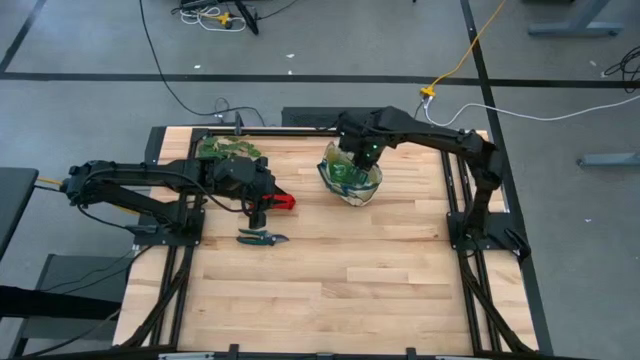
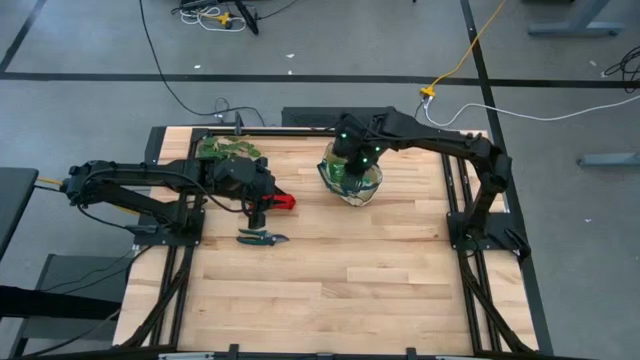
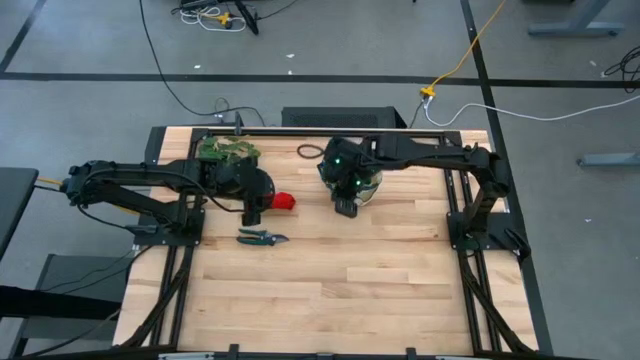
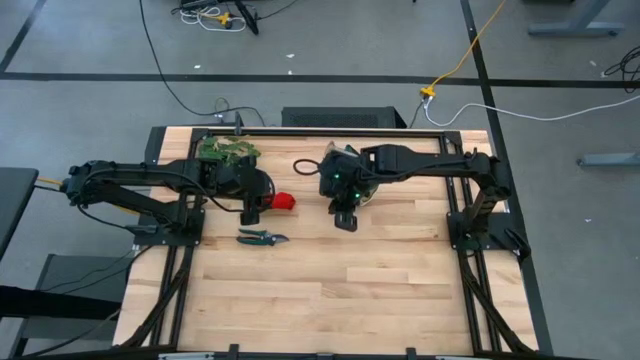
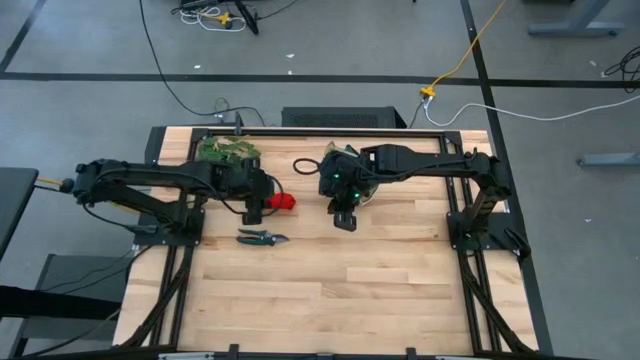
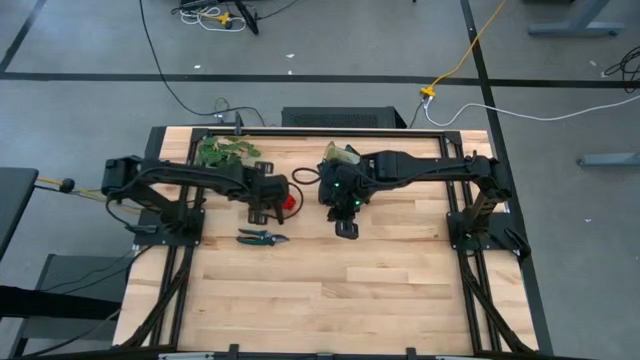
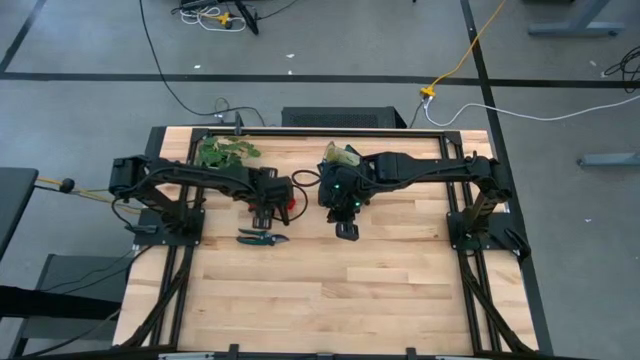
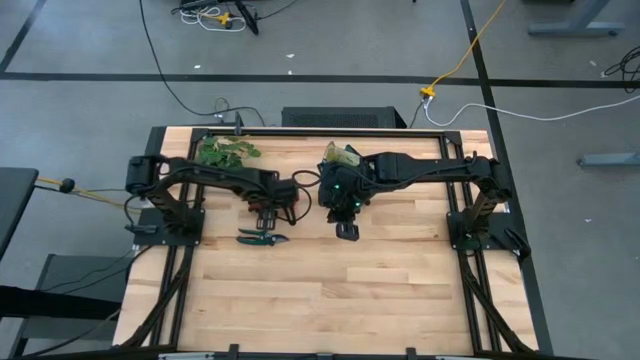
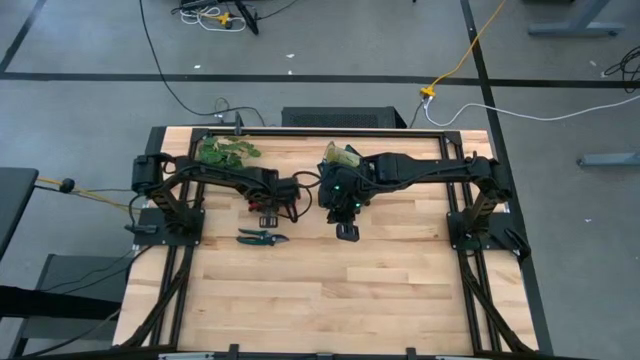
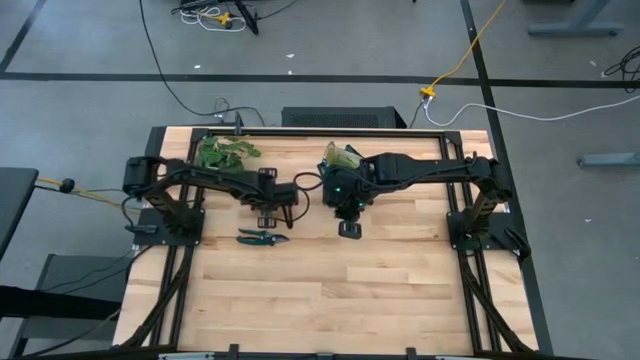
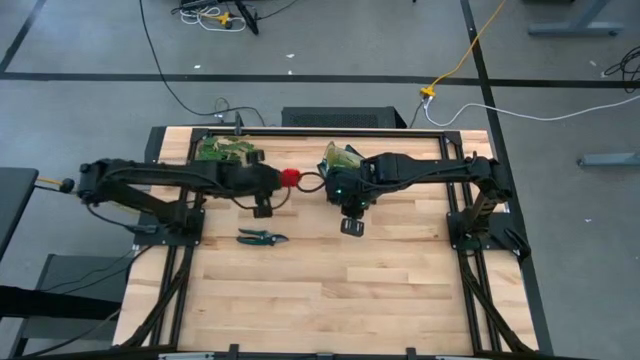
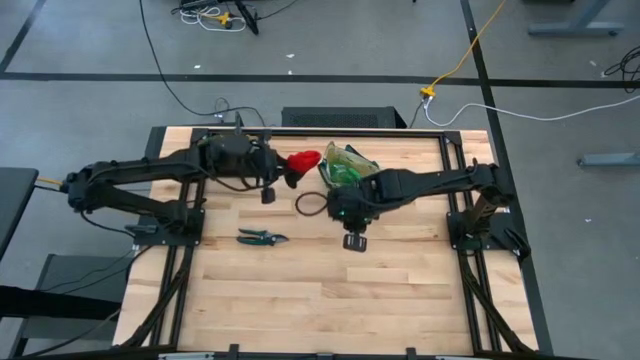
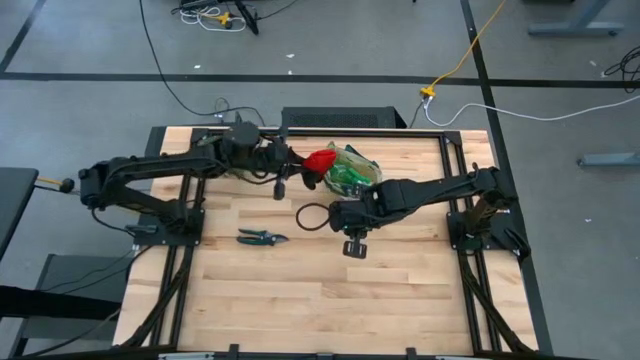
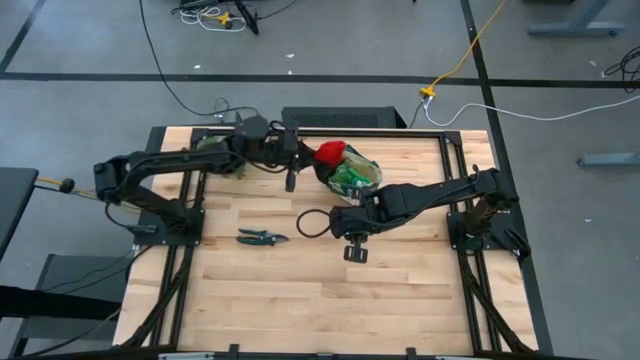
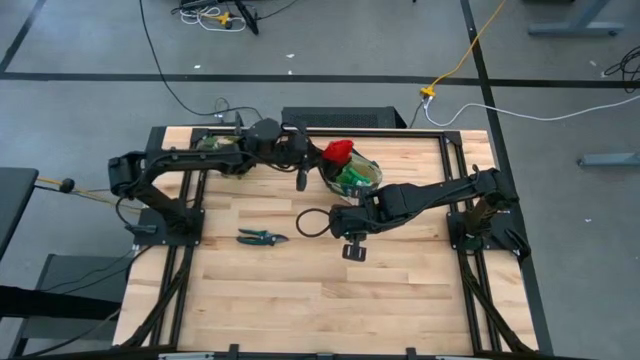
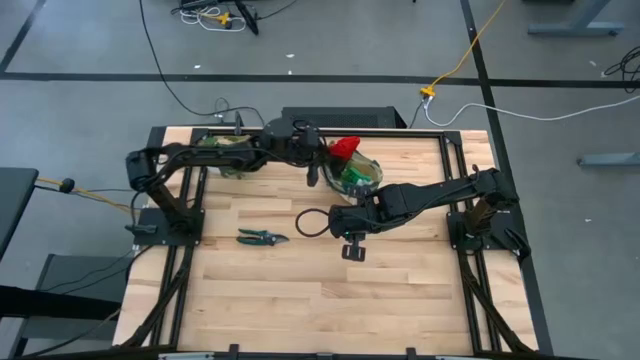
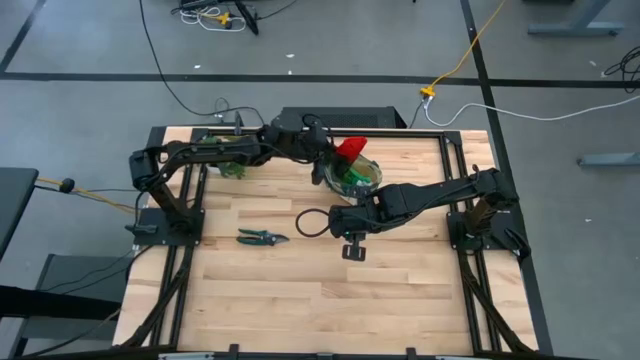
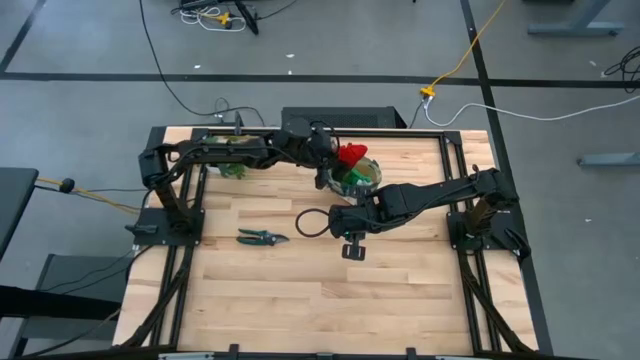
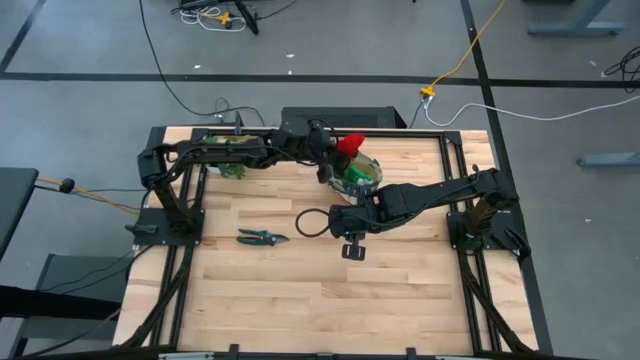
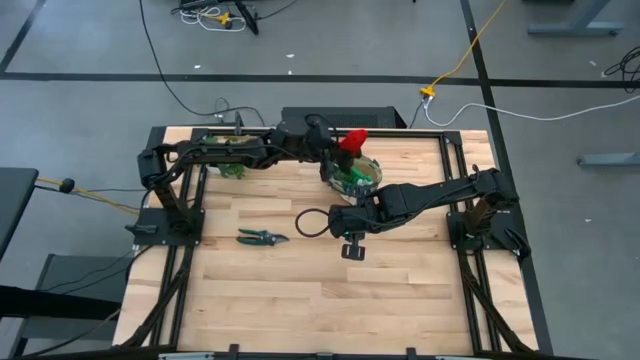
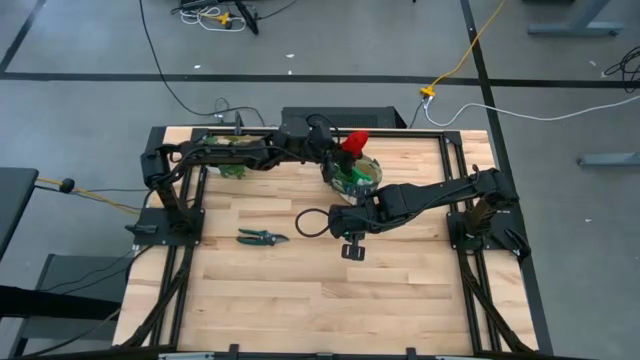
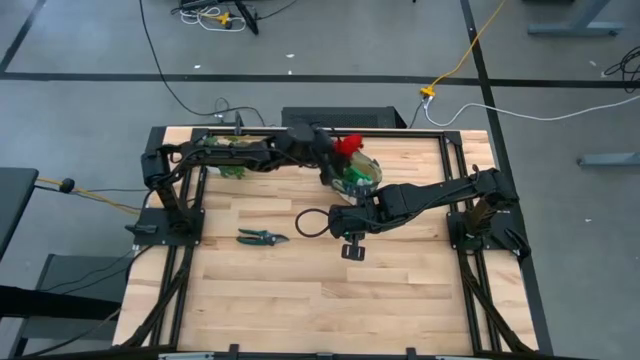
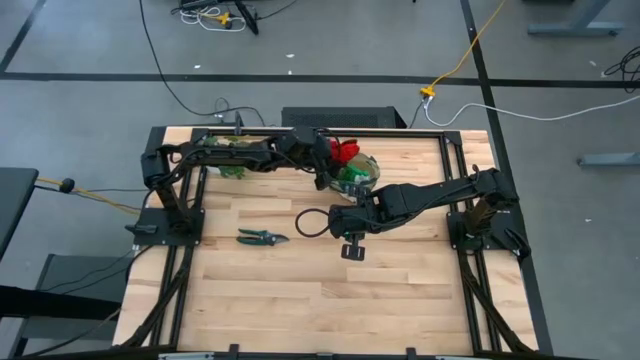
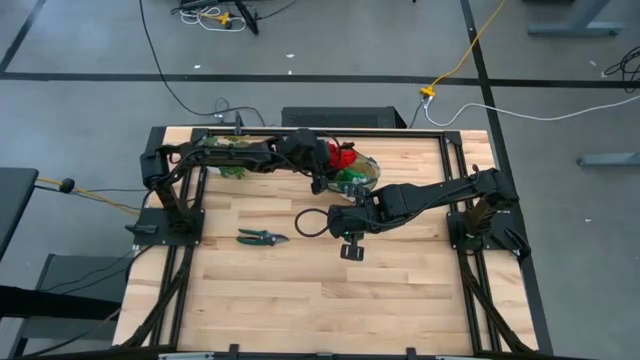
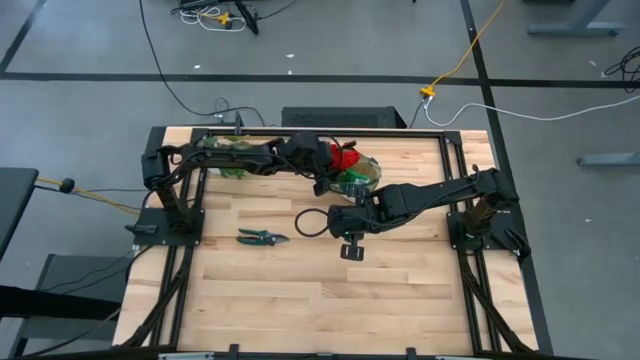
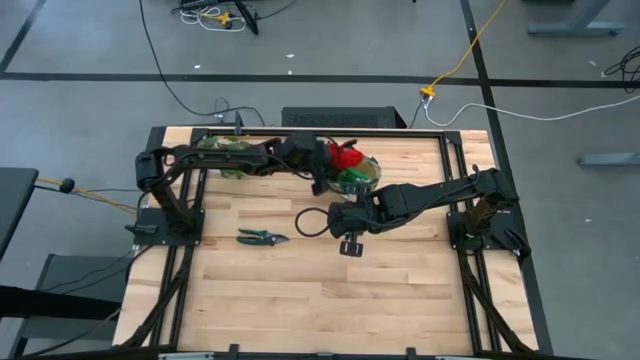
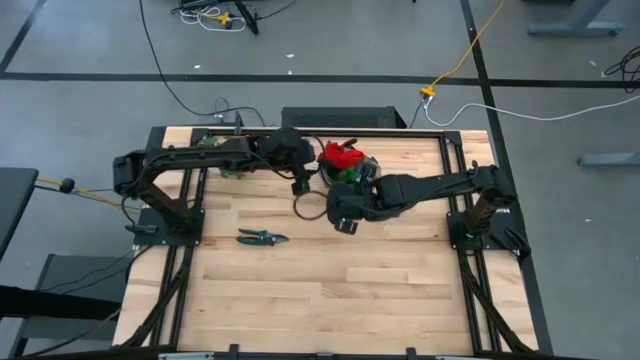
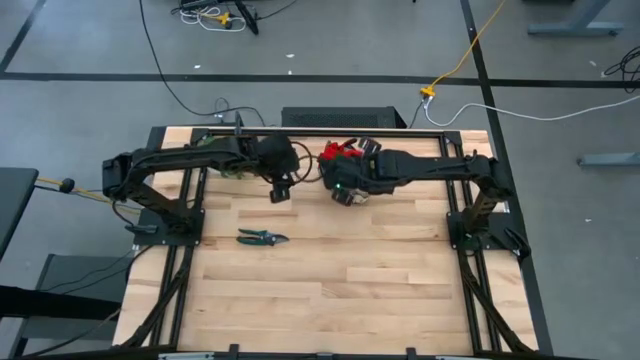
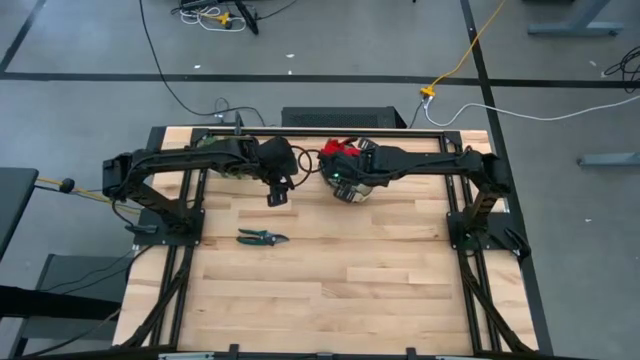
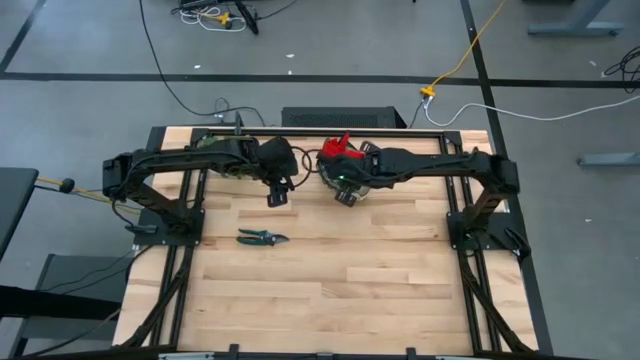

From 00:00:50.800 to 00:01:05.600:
Task: Pick & Place Garden tools in Gardening bag
Put the red gloves into the patterned white gardening bag

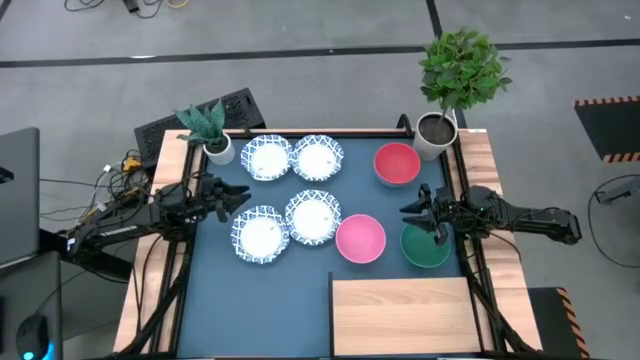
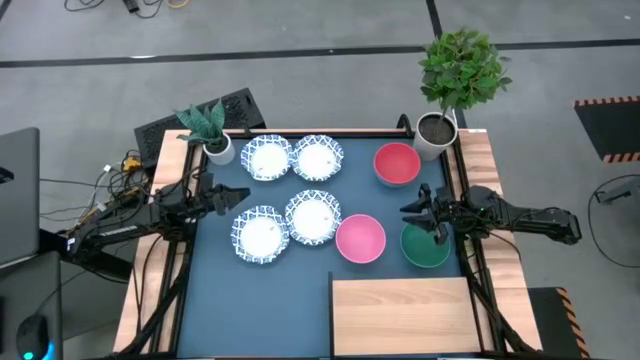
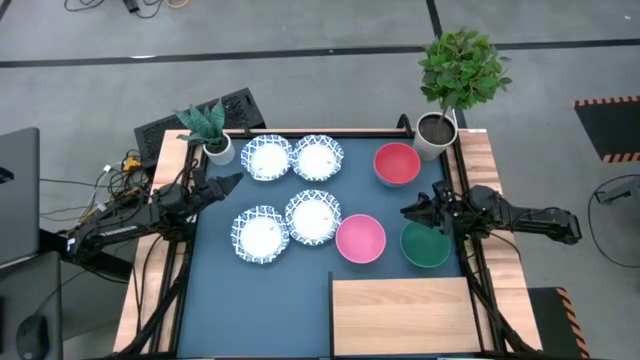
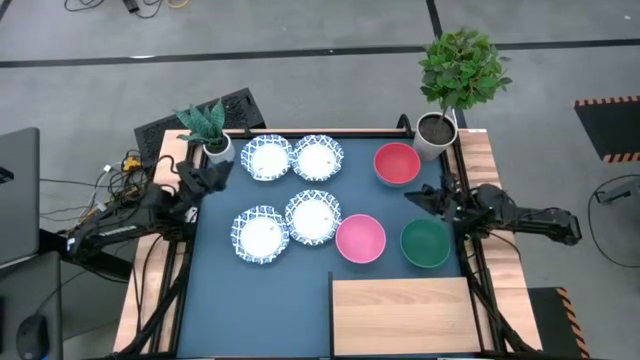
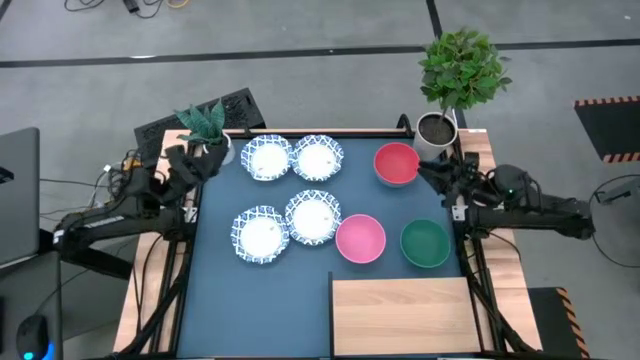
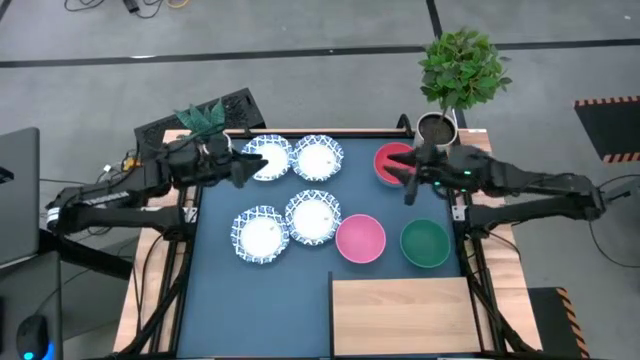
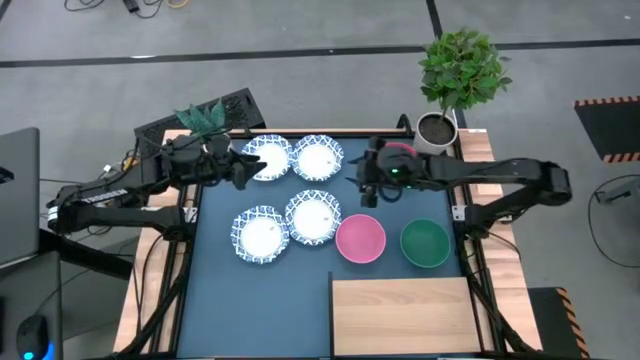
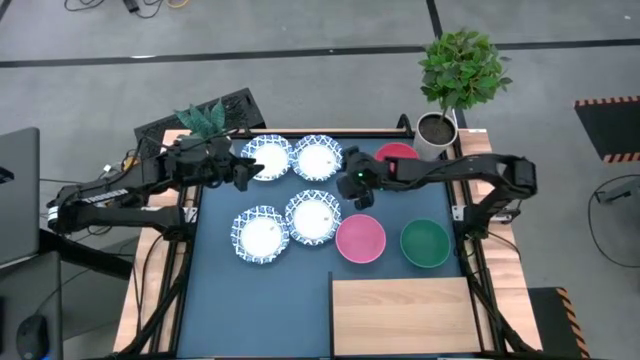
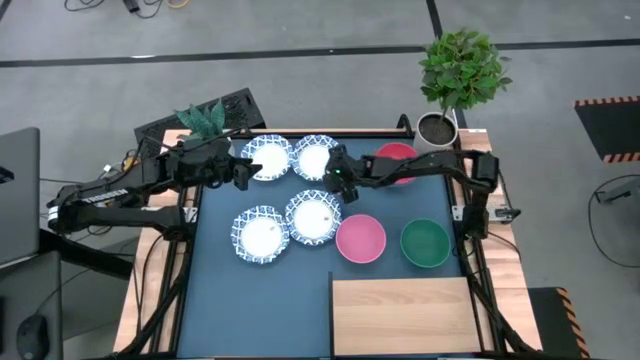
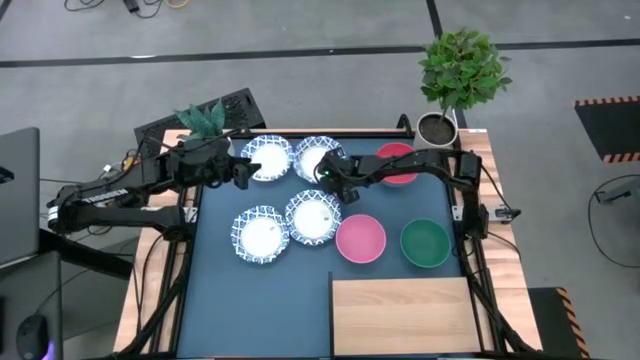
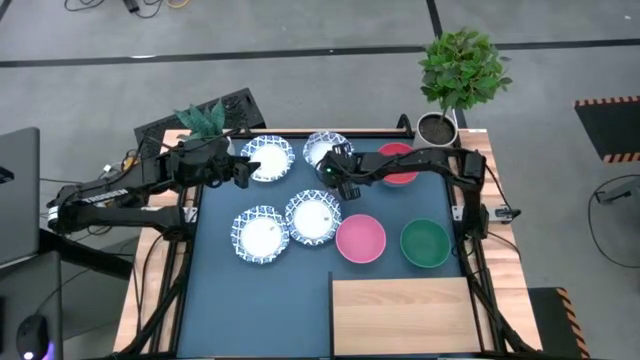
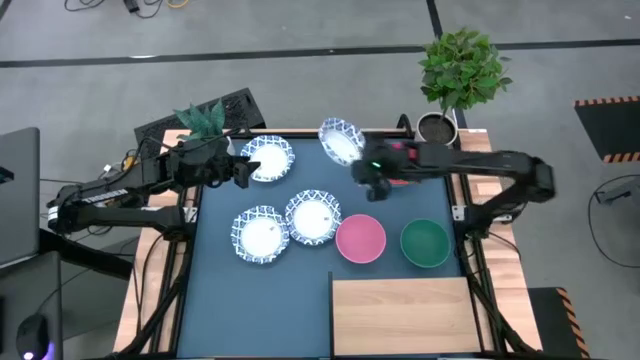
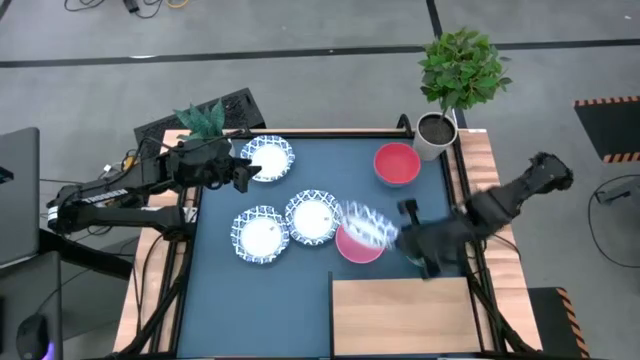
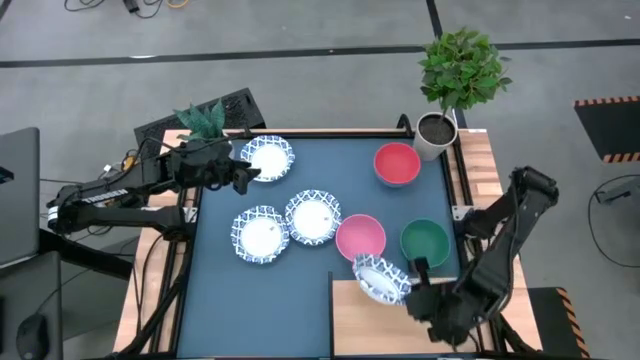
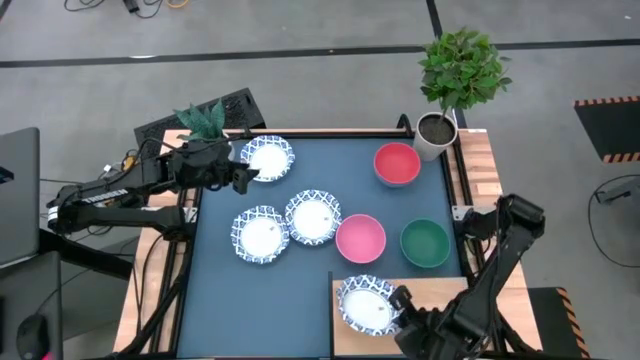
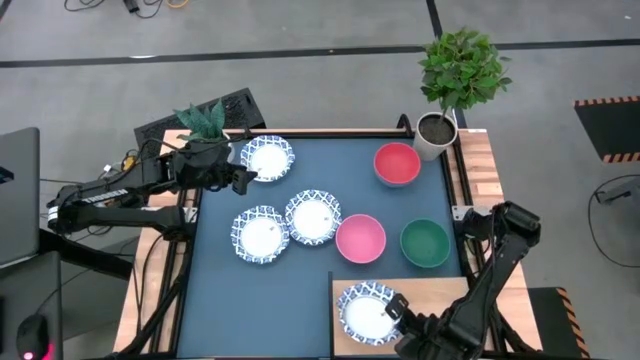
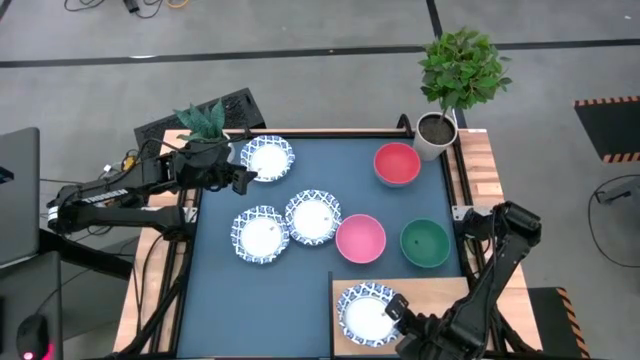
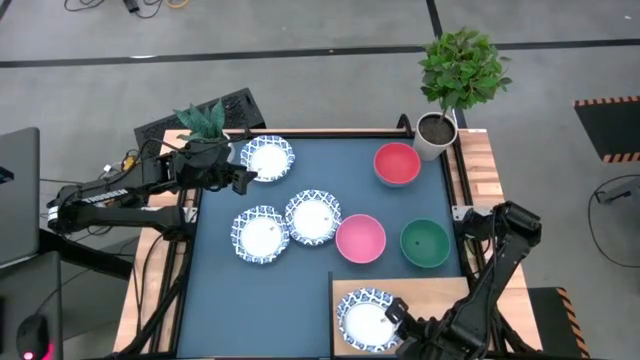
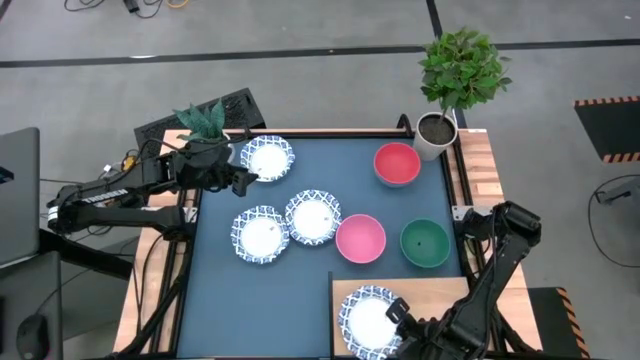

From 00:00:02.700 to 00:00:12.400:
Task: Place and stack bowls onto a shelf
Put the white patterned bowl on the shelf
